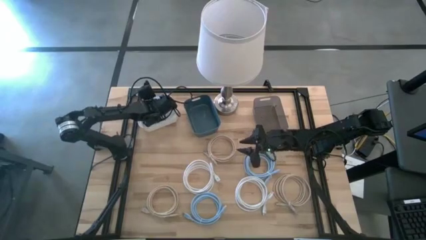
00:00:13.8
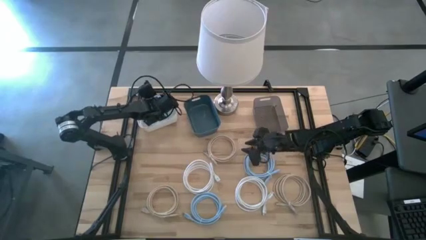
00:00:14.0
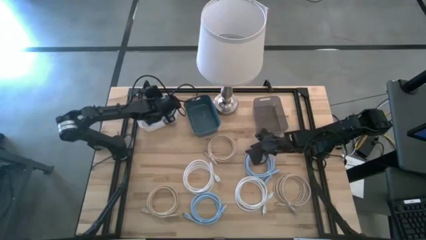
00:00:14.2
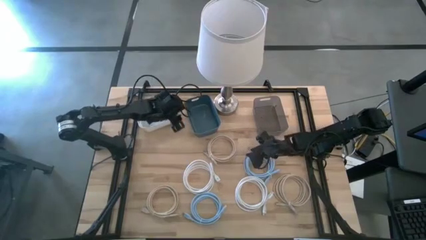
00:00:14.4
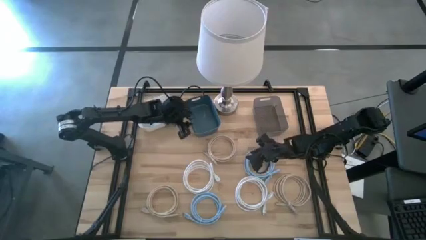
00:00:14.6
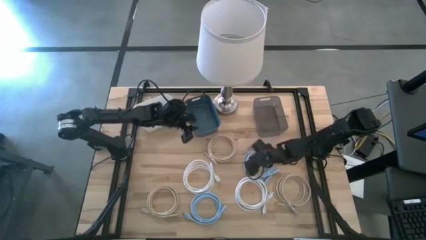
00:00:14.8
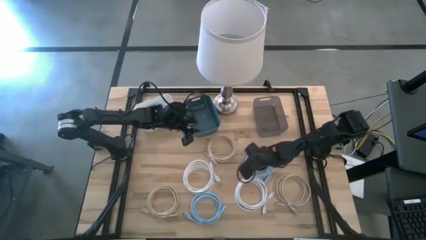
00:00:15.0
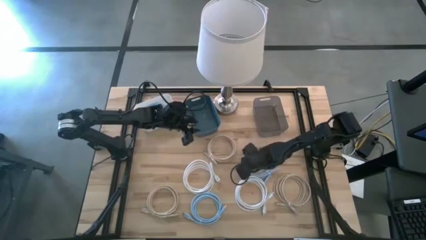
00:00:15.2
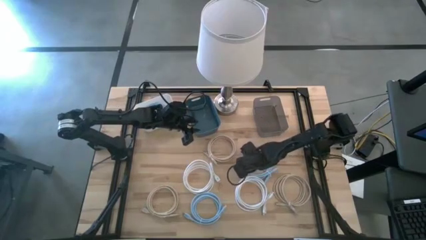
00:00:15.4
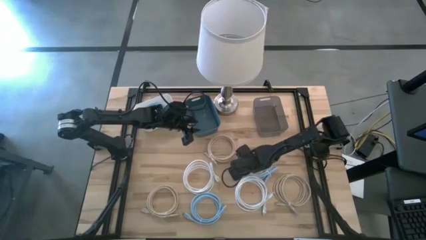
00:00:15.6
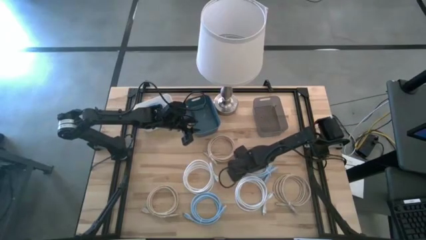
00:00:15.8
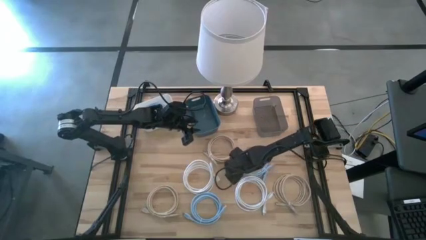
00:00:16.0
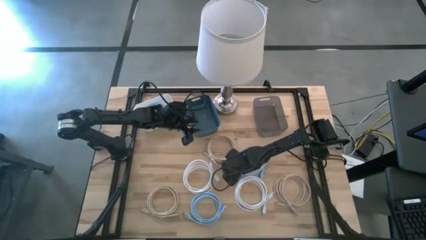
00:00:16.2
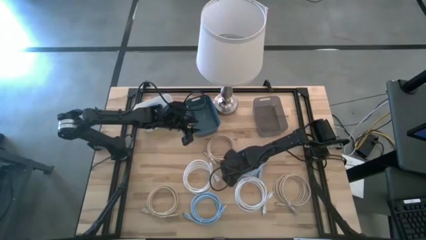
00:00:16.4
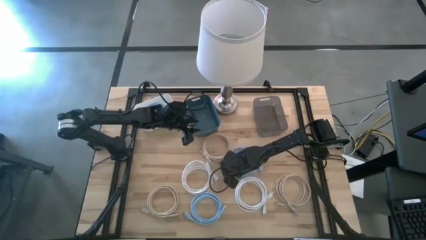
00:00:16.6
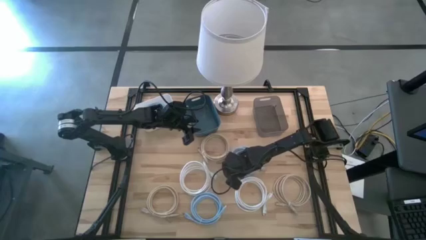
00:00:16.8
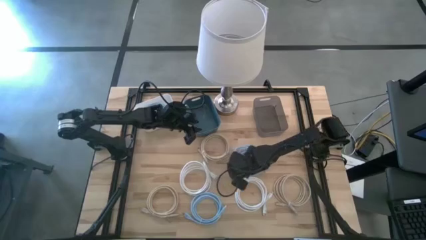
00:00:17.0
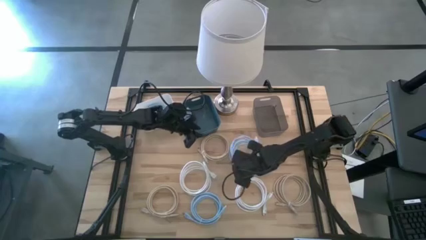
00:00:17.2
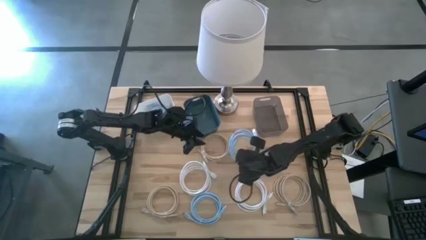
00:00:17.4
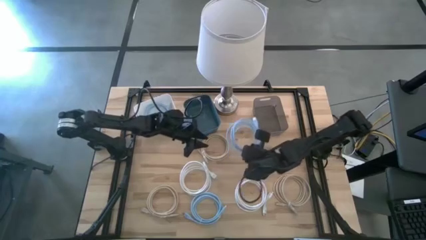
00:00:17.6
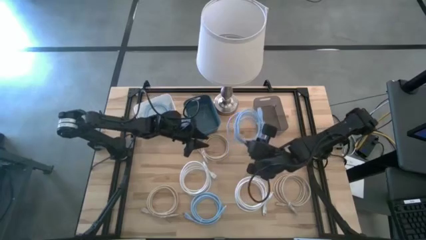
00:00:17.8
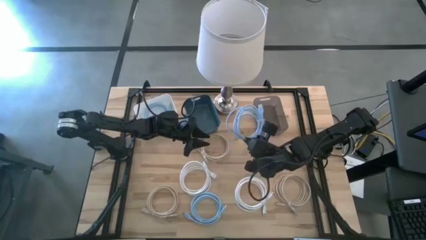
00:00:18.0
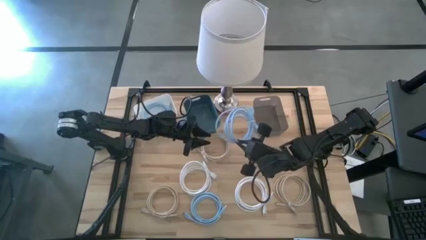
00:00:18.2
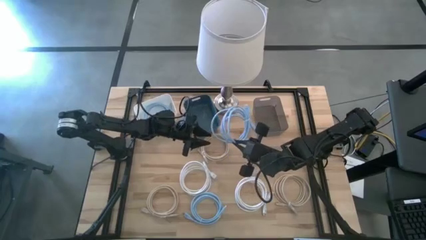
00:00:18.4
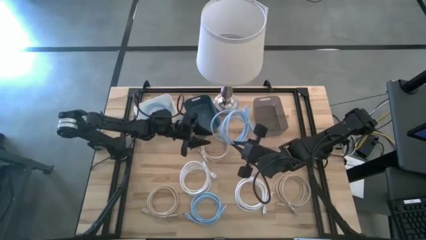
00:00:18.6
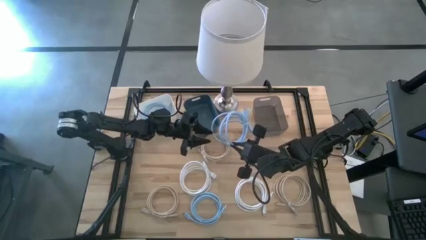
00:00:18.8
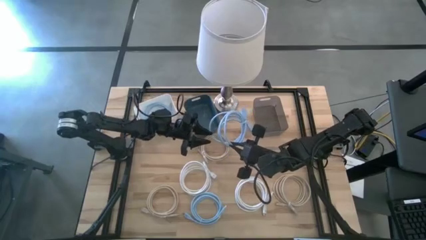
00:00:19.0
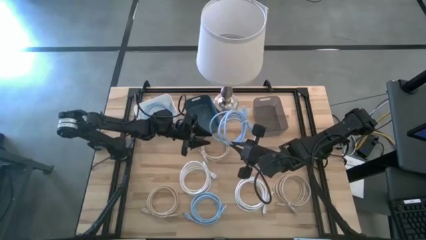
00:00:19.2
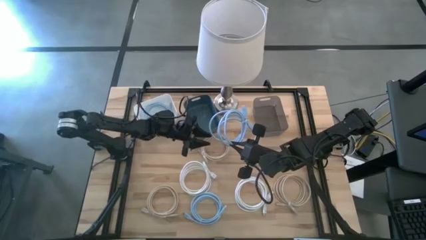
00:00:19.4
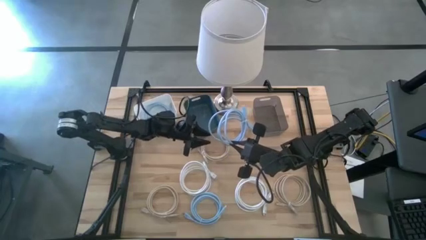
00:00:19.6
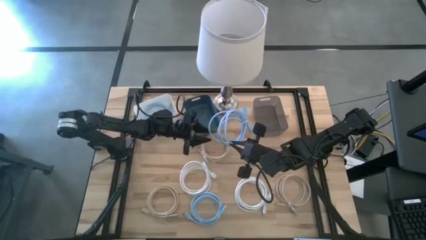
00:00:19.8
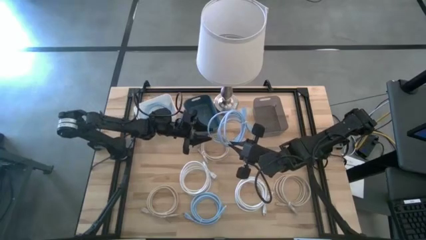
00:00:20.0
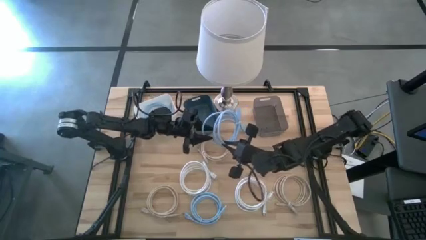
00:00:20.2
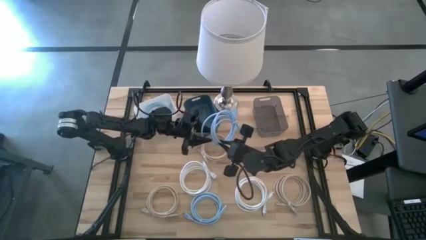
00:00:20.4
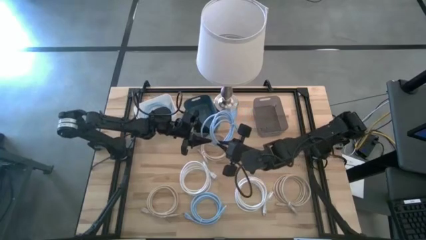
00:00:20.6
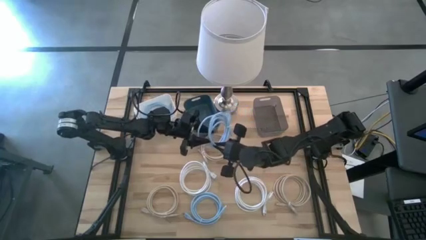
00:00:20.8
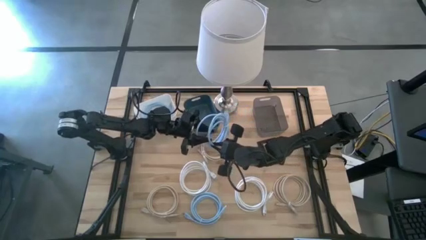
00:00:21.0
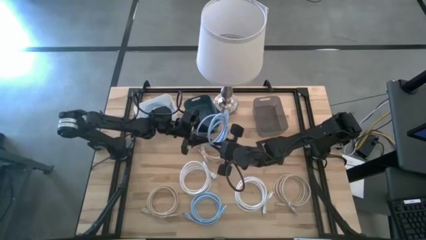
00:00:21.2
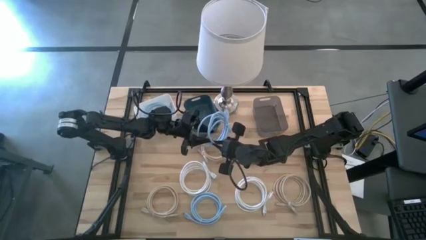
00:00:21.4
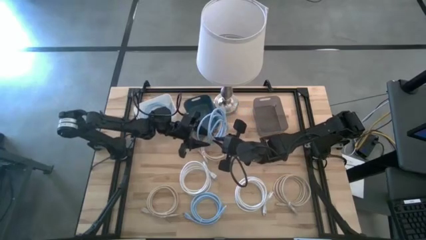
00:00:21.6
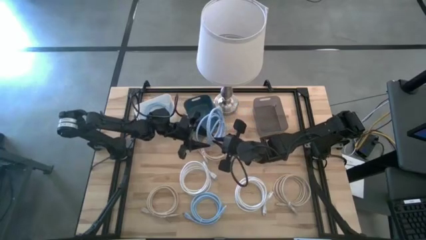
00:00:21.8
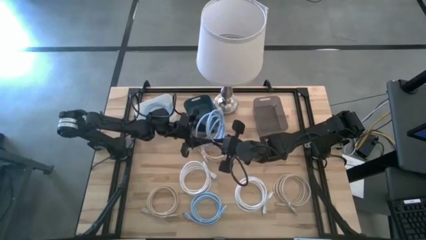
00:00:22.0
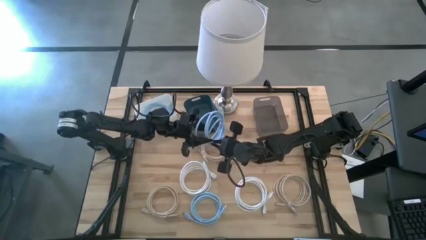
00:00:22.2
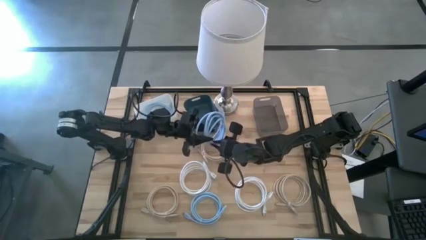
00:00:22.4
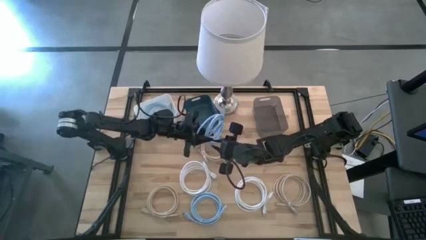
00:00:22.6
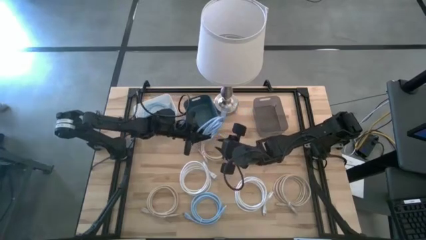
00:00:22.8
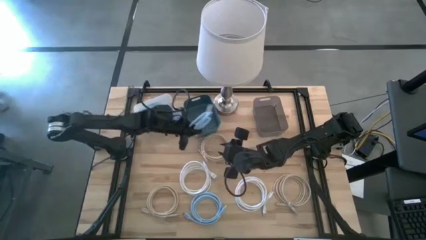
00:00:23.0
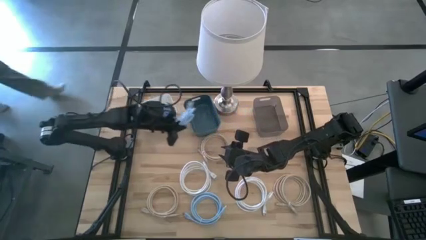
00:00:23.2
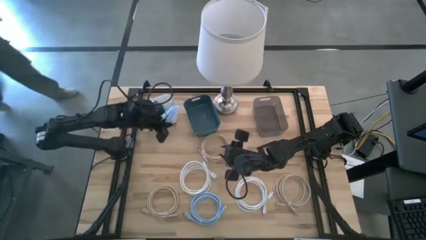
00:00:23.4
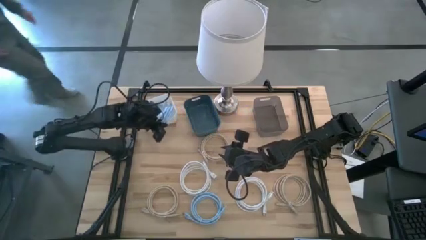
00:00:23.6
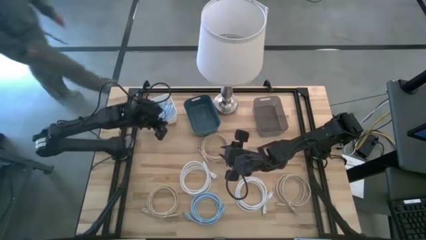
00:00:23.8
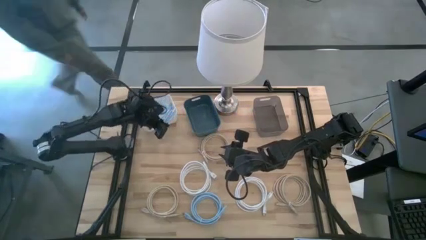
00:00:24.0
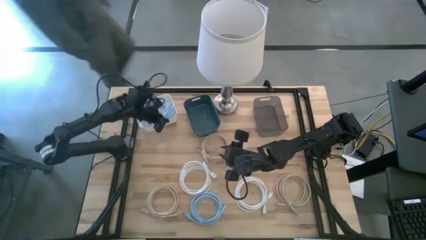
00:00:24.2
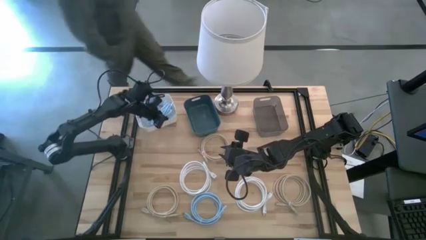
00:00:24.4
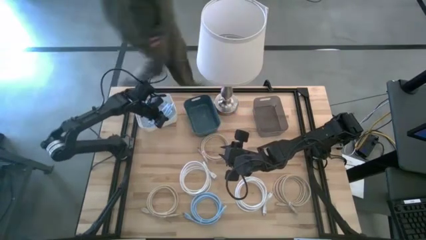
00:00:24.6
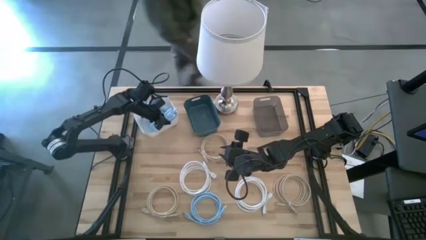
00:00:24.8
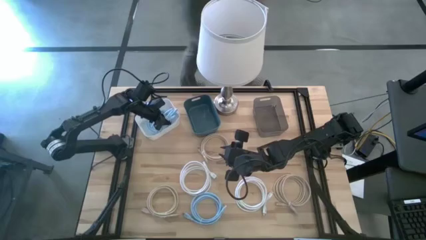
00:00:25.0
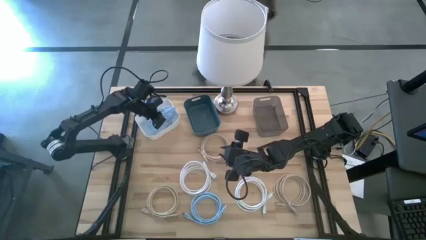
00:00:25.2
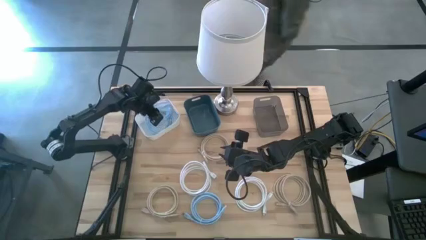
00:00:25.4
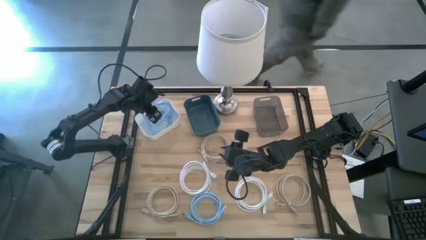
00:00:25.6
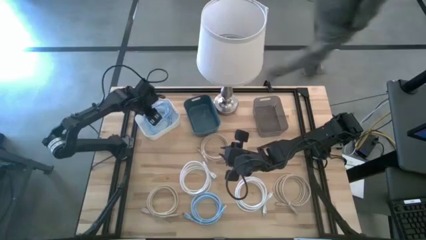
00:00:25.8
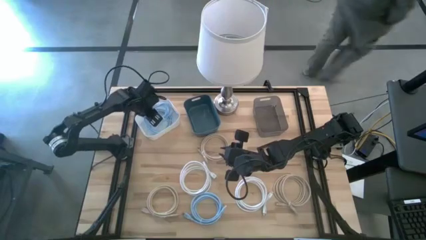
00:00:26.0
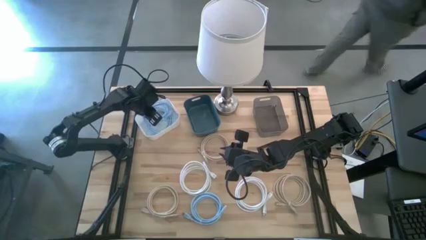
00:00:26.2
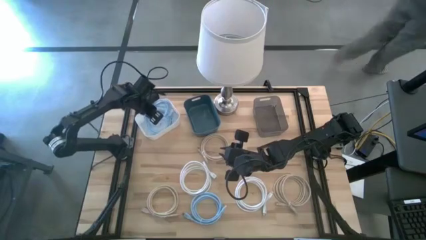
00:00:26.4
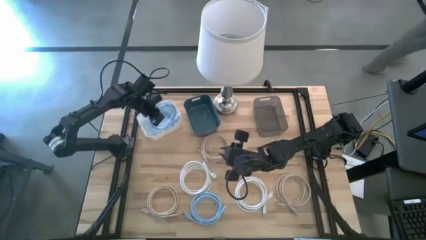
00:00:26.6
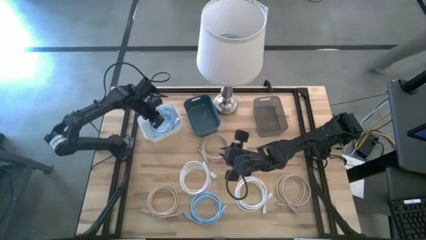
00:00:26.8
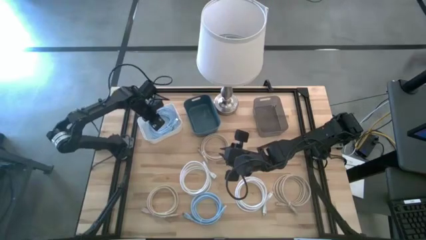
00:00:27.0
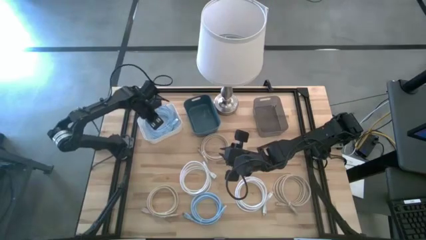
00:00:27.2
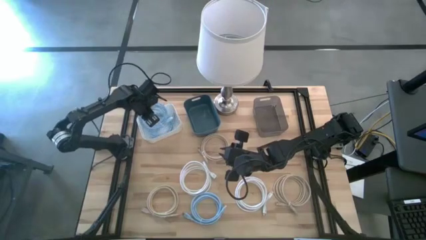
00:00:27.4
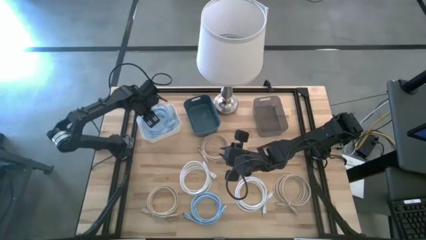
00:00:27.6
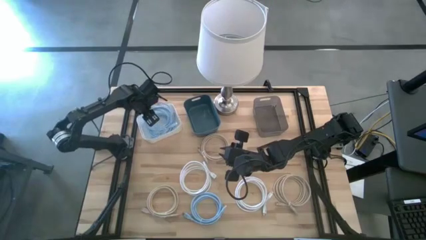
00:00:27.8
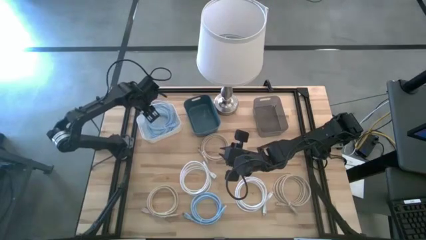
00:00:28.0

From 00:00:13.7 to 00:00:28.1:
Task: Pick & Place USB Port
Put the right blue charger cable into the white bin

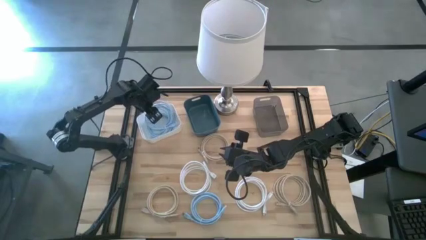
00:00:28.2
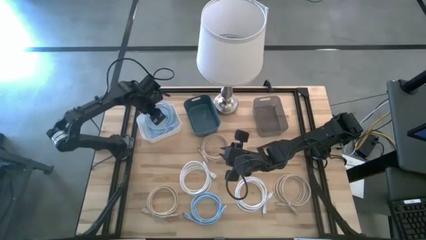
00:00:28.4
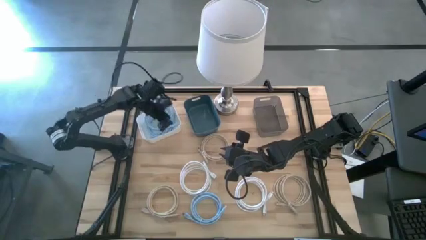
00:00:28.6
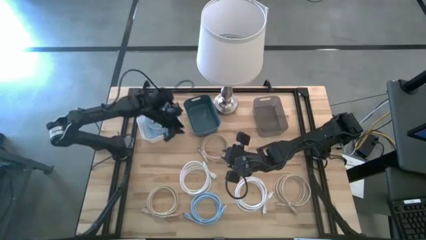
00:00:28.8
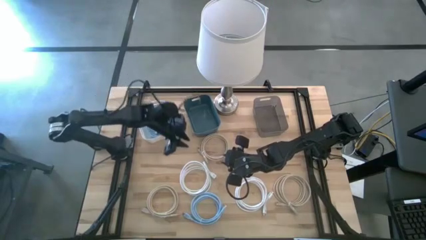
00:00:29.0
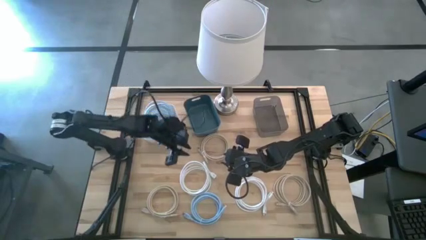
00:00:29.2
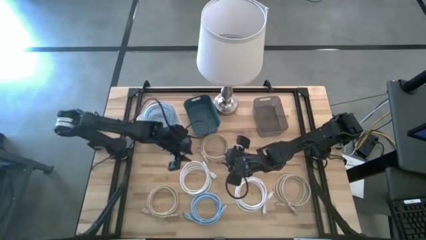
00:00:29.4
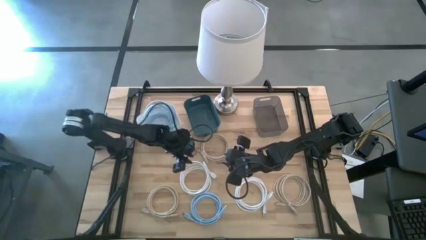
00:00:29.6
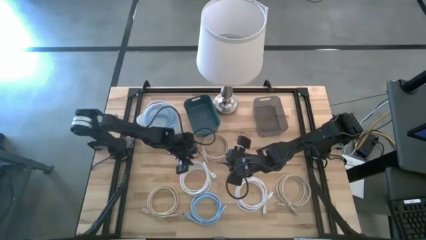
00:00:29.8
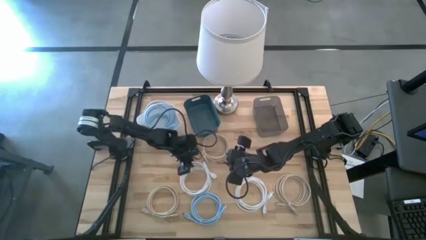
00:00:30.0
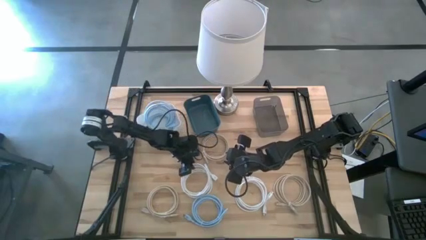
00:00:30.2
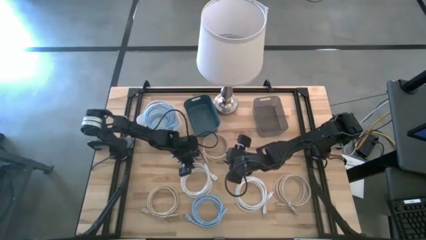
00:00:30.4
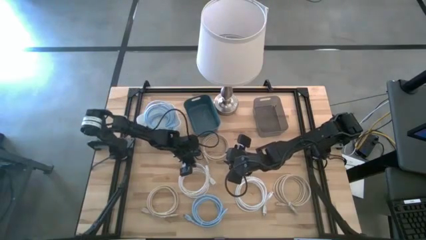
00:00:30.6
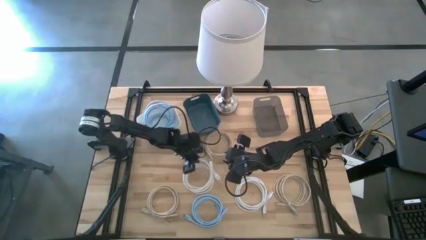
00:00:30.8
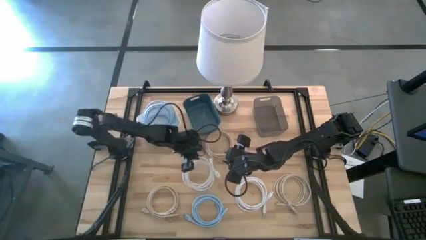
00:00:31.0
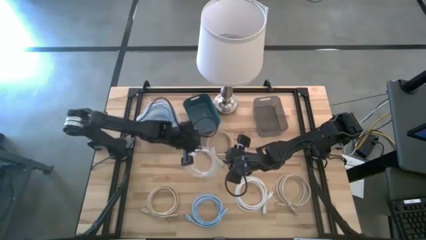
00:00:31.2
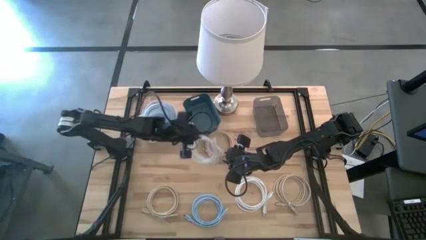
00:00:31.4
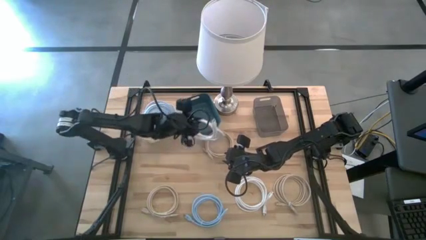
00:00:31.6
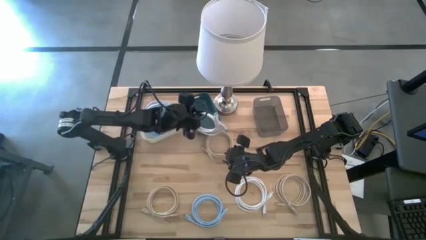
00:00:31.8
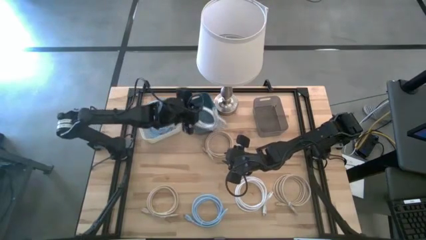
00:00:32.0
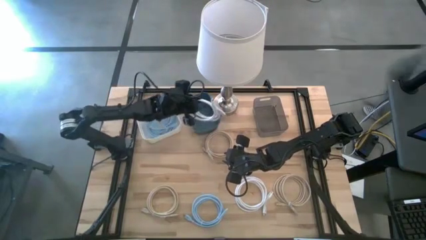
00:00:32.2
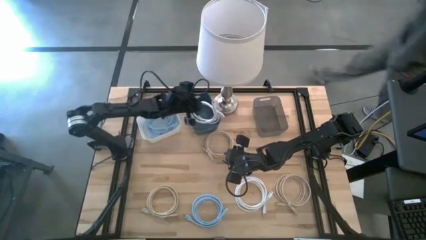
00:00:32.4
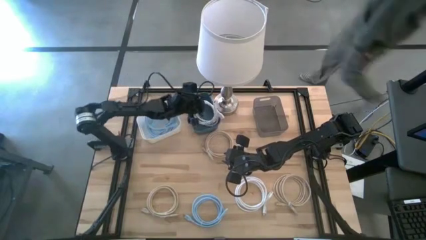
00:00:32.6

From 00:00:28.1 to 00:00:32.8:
Put the left white charger cable into the blue bin
